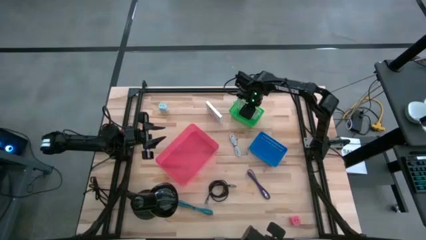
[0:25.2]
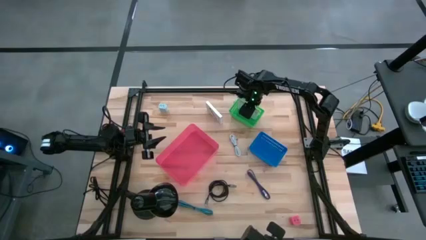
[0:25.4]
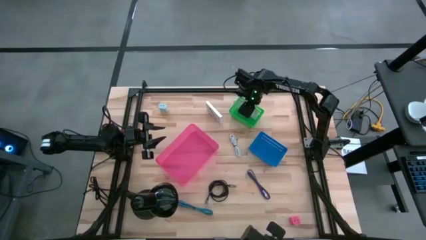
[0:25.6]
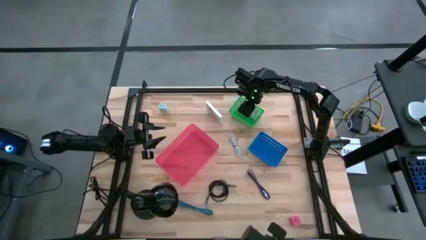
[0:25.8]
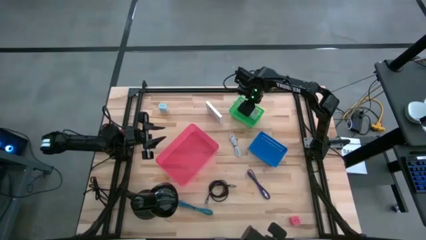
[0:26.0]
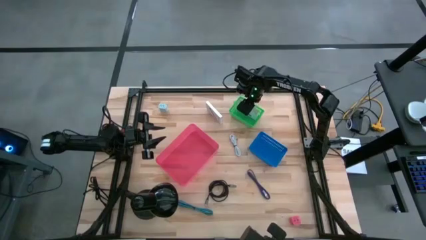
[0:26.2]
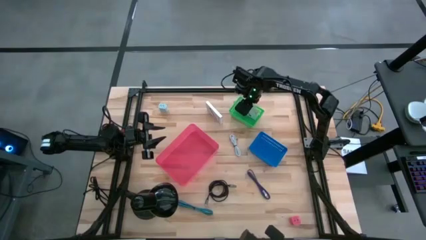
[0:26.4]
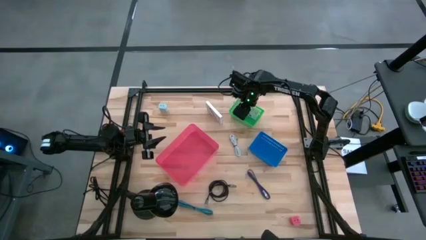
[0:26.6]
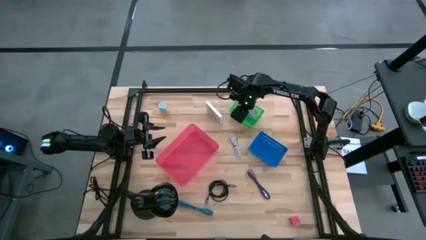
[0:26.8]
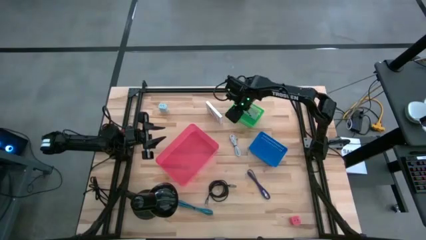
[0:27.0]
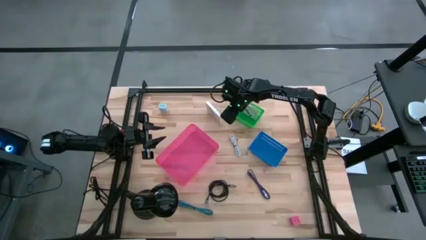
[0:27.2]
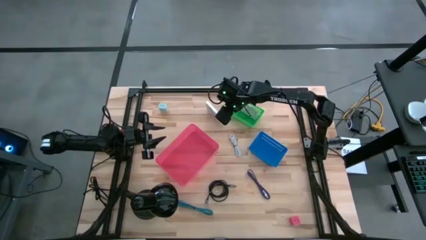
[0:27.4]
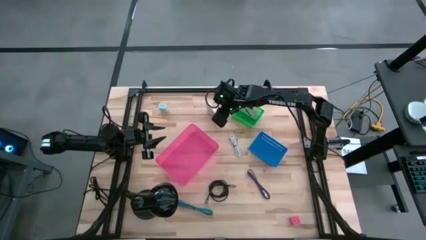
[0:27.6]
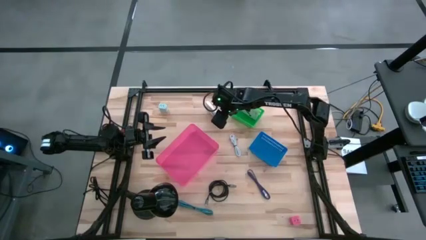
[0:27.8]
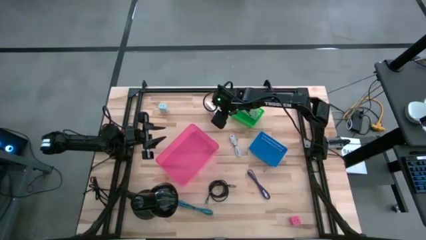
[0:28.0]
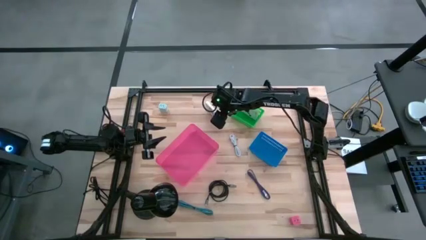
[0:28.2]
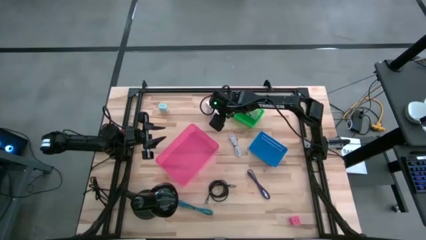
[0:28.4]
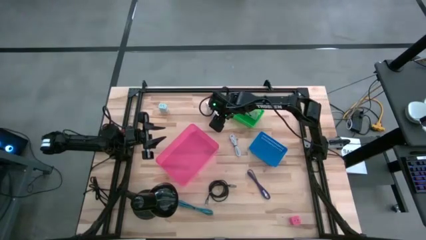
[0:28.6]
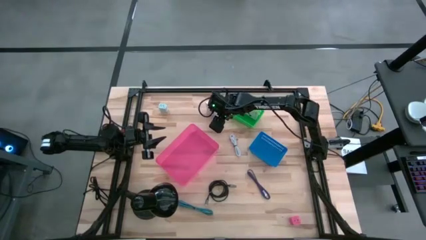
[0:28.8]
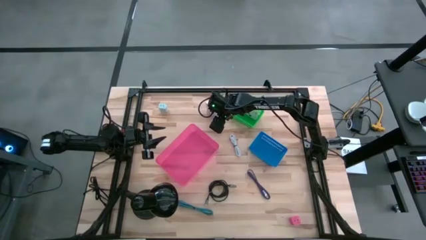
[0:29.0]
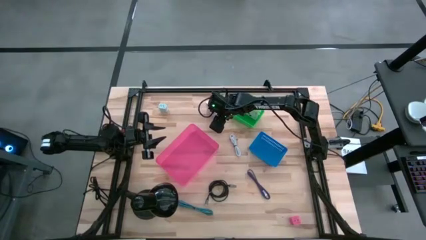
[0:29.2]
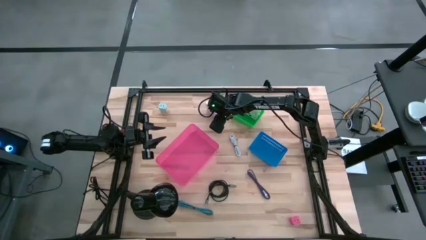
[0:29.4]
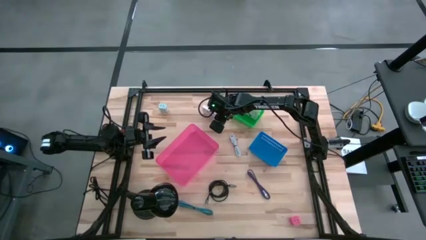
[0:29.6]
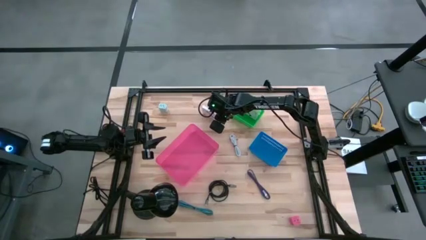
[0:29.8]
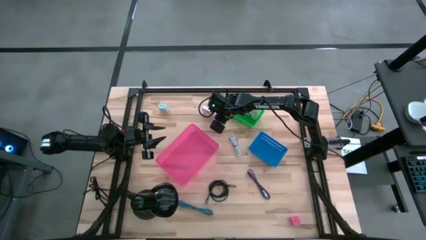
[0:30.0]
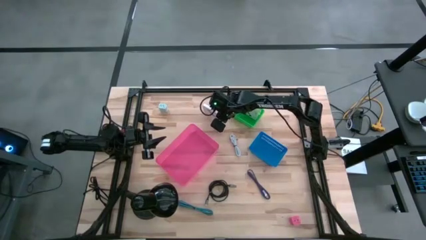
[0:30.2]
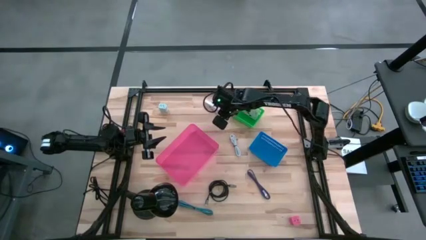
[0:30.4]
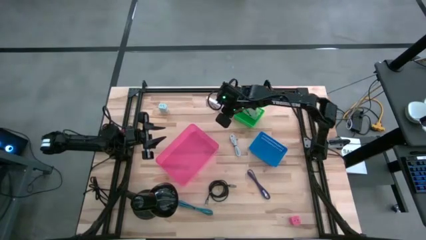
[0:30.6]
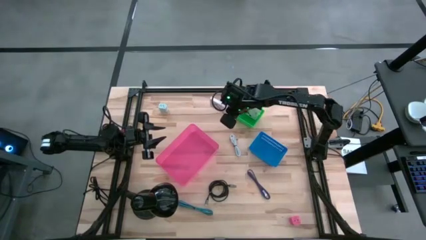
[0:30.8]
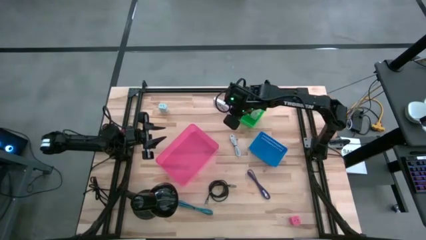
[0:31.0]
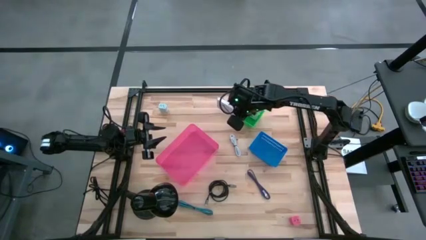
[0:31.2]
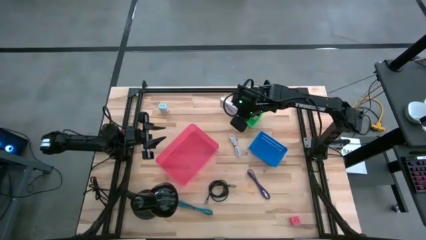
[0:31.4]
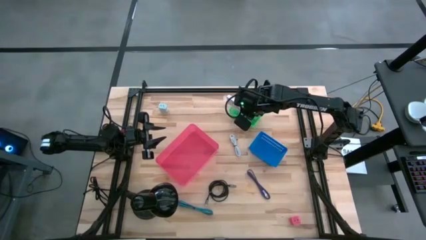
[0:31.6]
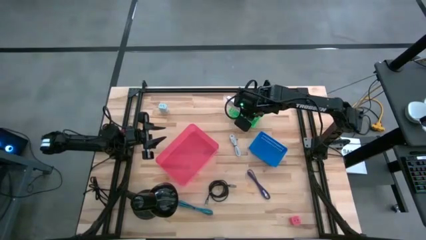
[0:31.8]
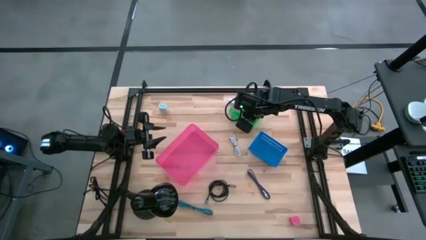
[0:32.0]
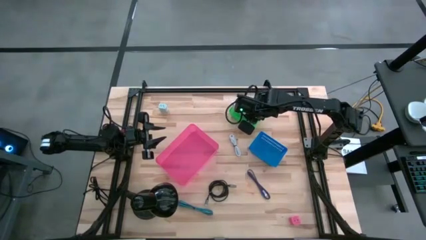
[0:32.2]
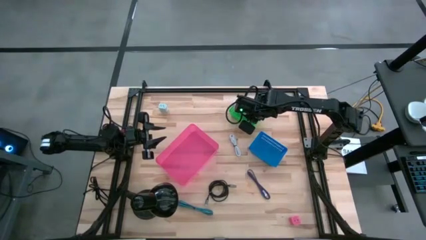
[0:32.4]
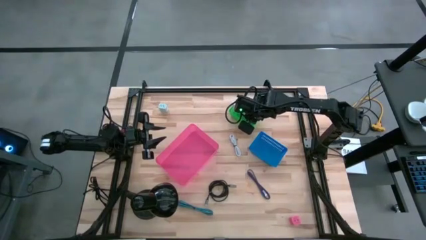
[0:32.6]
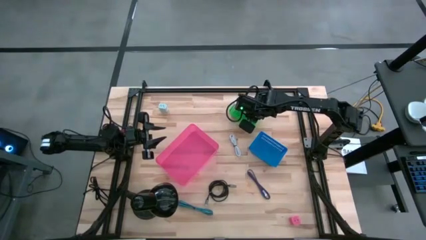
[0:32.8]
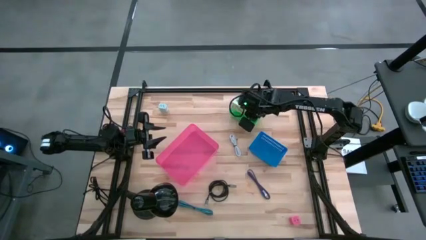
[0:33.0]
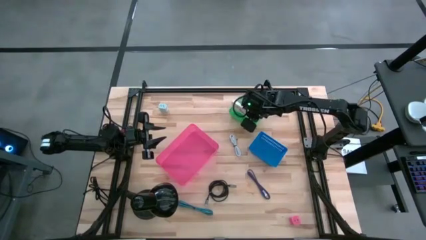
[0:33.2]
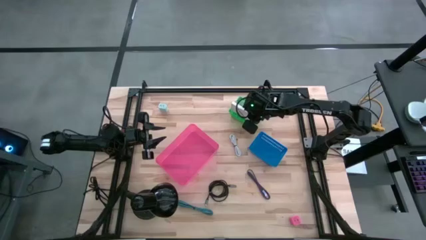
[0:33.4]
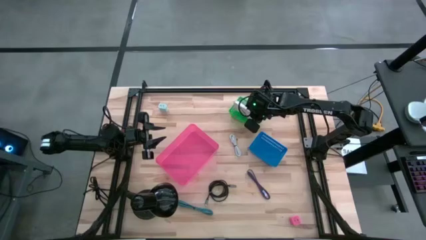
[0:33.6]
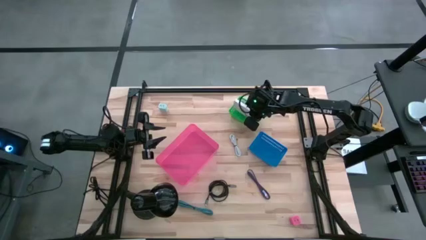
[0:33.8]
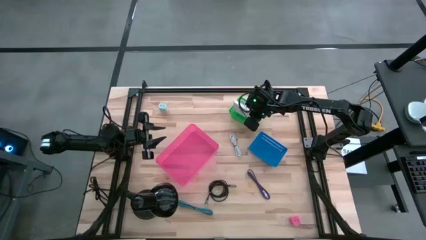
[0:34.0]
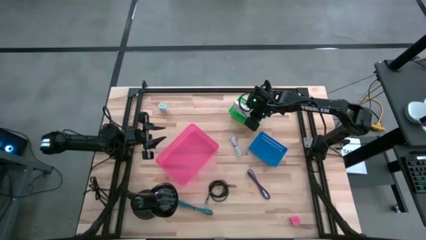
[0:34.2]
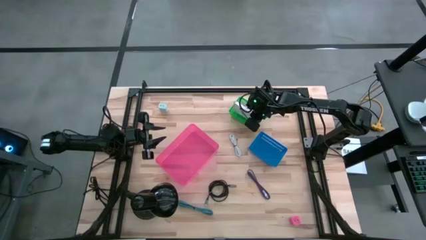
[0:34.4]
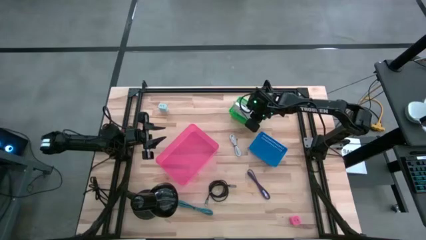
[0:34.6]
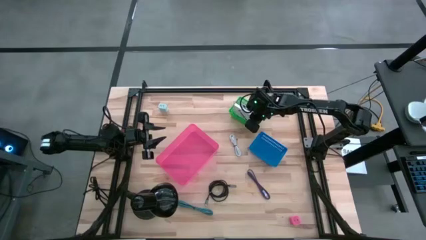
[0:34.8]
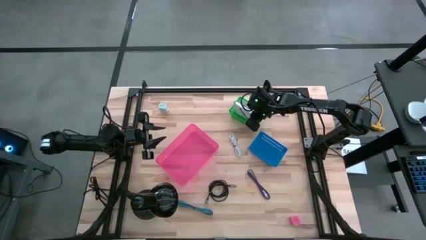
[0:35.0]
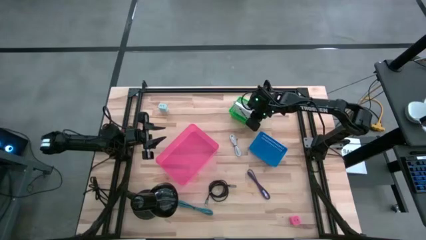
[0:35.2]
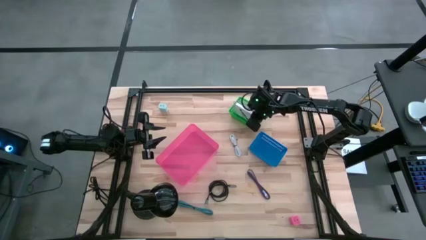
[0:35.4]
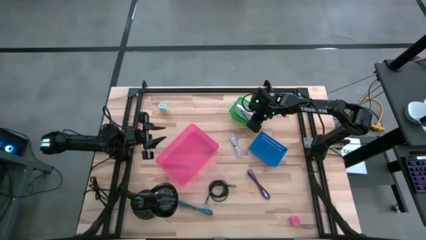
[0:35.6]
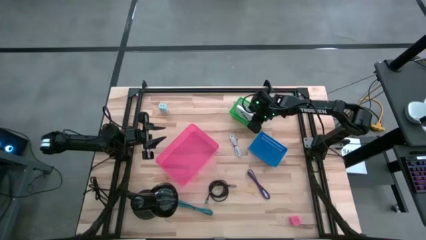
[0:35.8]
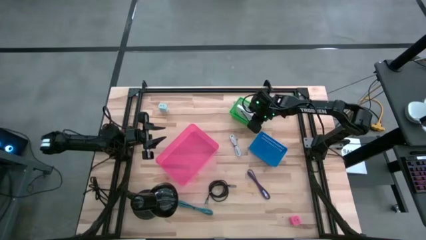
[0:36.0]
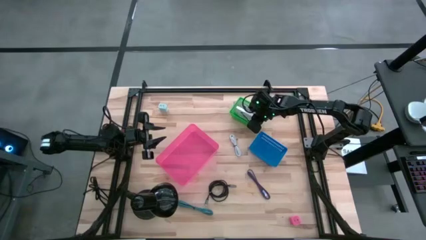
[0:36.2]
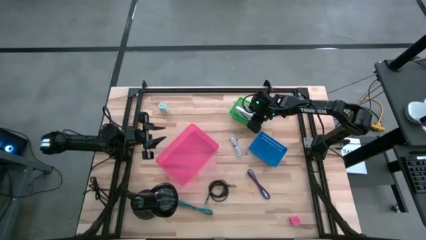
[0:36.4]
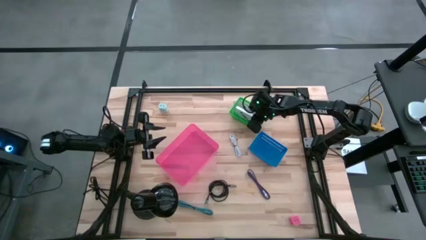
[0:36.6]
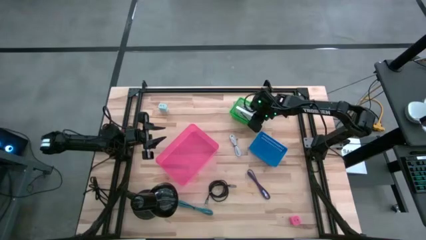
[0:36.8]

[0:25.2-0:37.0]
Task: Pick and place items into bin
Put the white USB card reader box into the green bin

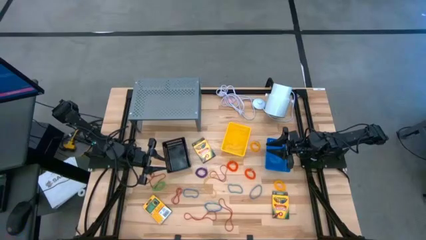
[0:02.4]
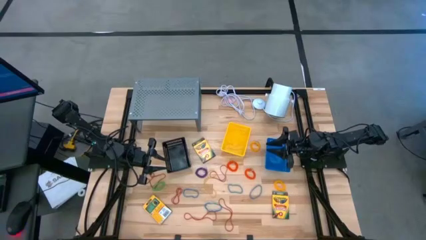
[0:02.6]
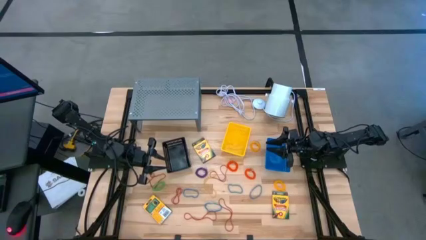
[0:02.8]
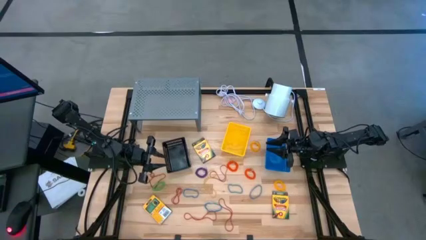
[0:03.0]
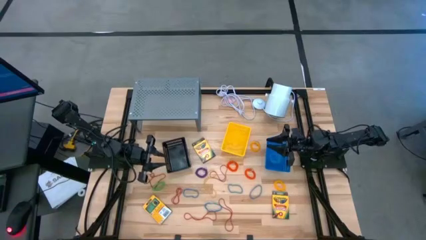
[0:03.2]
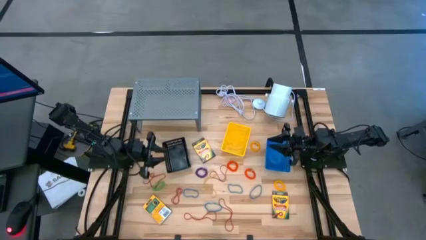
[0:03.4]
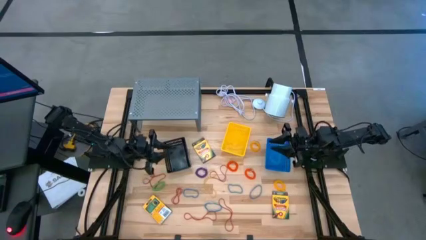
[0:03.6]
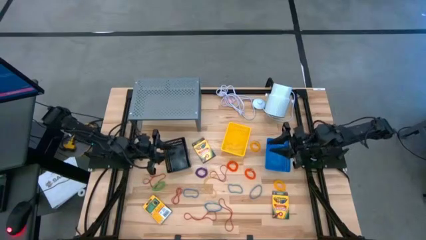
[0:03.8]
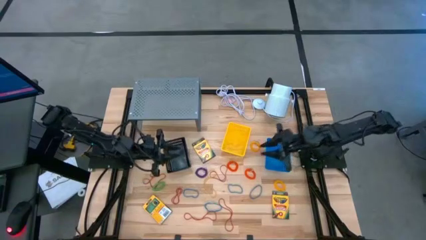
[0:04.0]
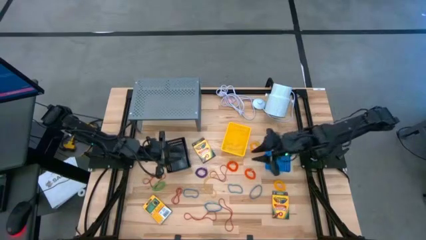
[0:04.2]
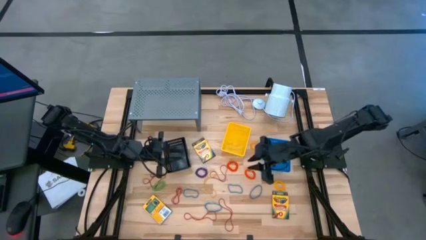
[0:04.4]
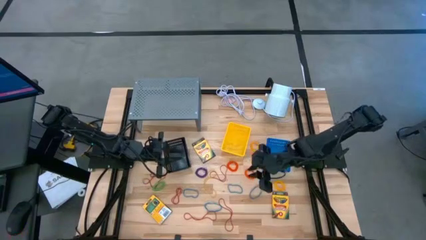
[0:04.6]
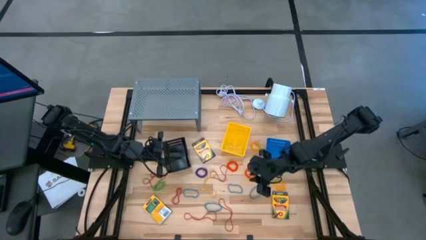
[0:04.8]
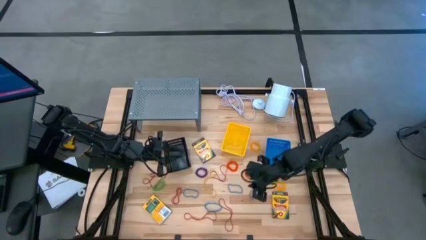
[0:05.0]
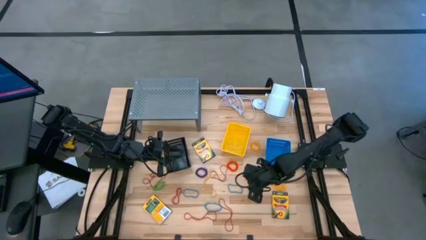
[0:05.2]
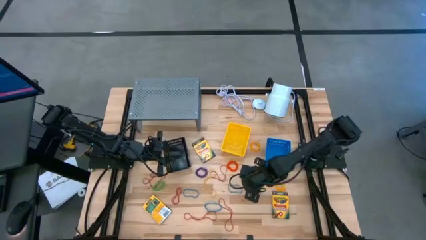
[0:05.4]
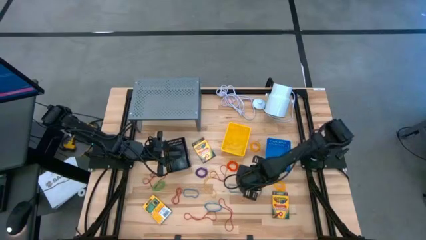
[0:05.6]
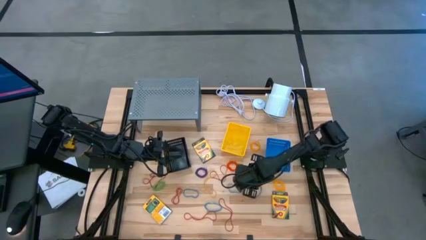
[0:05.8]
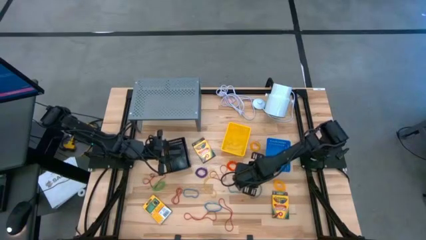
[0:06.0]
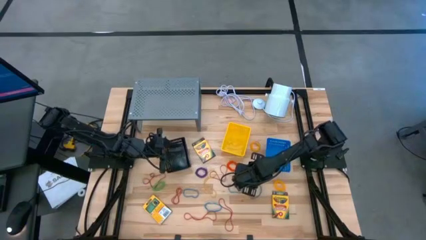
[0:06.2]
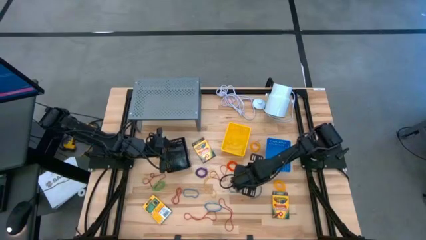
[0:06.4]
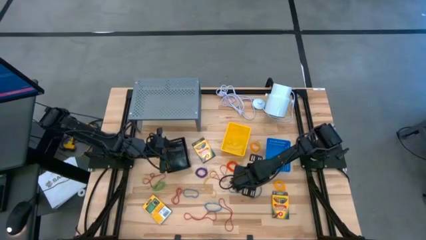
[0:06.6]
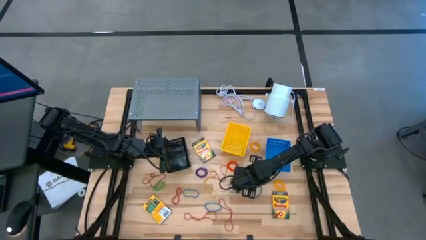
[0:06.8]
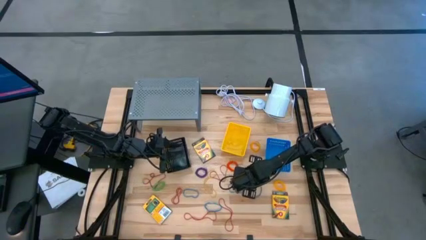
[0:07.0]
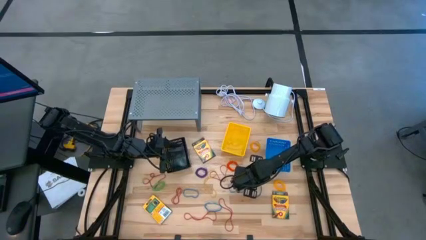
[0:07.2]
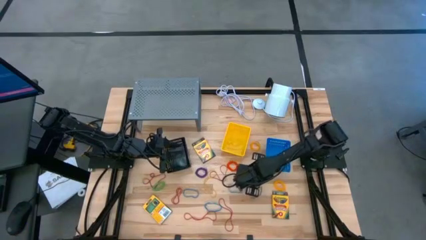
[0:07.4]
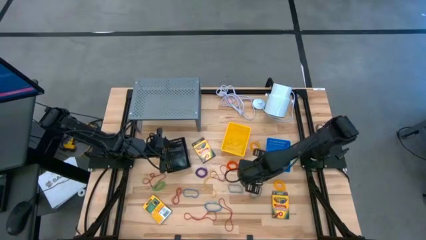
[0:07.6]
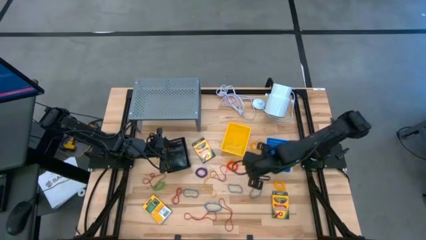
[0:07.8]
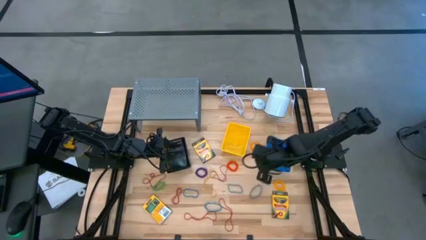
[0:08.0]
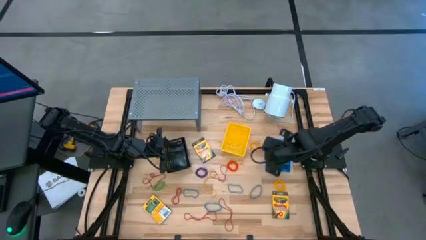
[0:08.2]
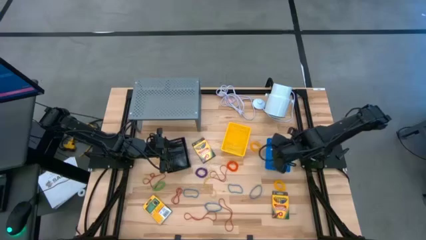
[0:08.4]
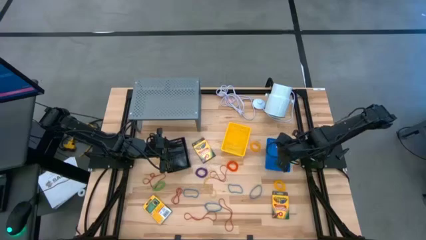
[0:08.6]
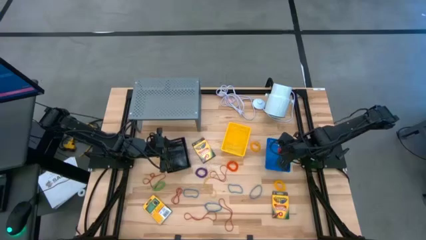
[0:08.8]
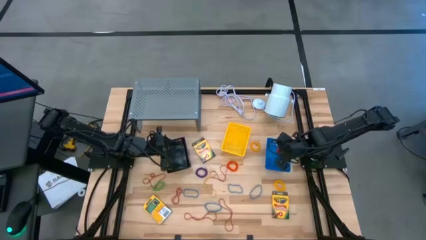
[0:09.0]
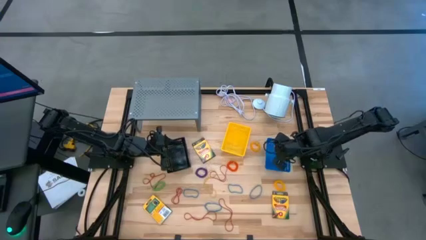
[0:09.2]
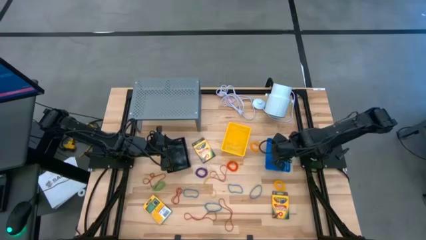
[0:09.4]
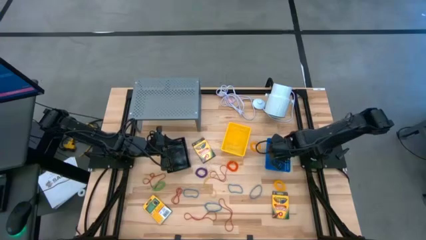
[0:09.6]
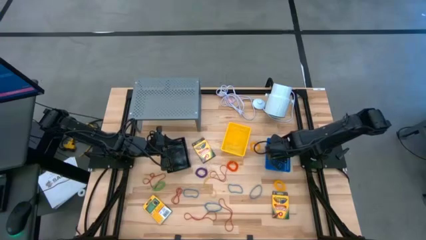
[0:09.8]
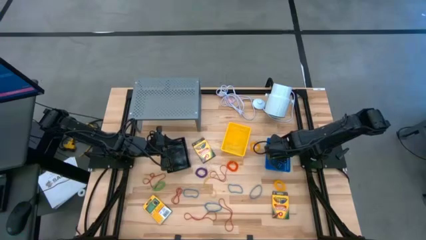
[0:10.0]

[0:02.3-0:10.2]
Task: Pick & Place Office Desk Supplies
Put the orange spring keychain into the blue bin
